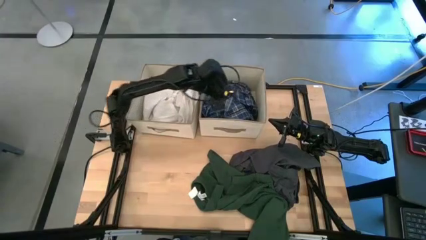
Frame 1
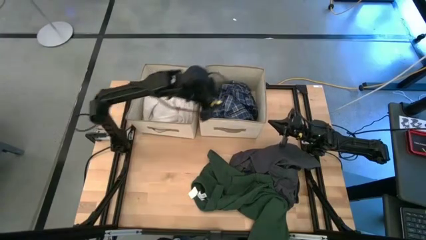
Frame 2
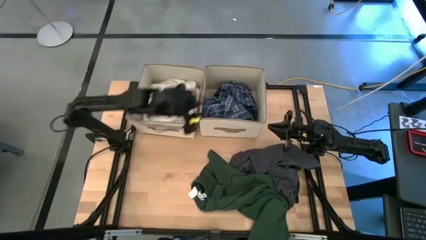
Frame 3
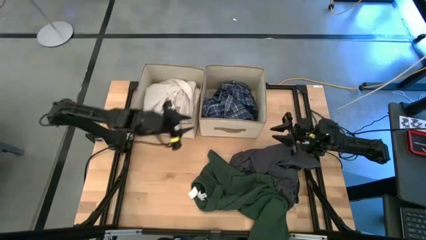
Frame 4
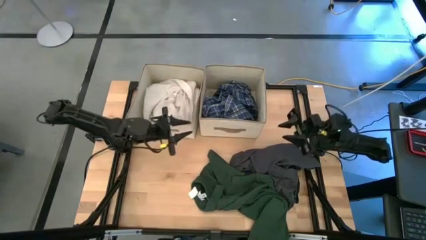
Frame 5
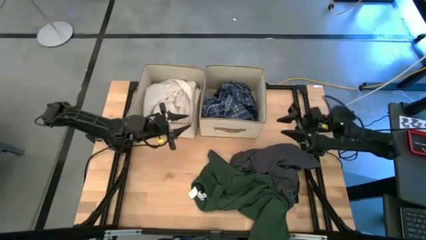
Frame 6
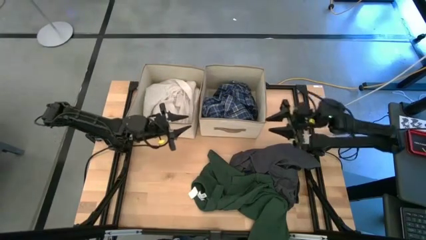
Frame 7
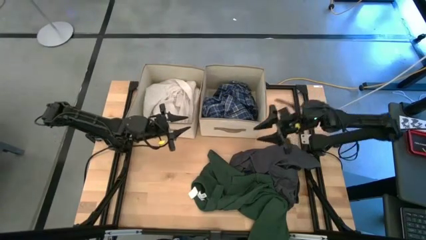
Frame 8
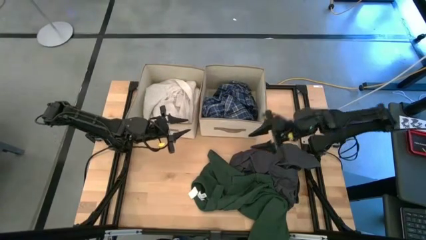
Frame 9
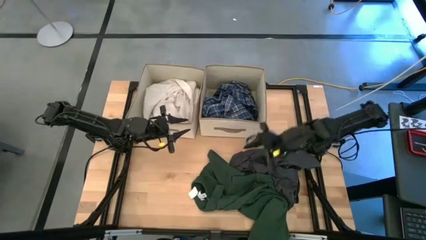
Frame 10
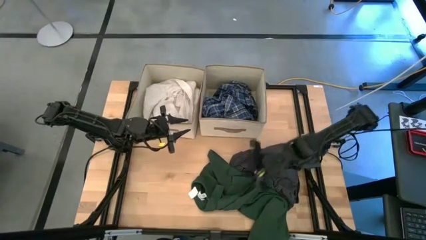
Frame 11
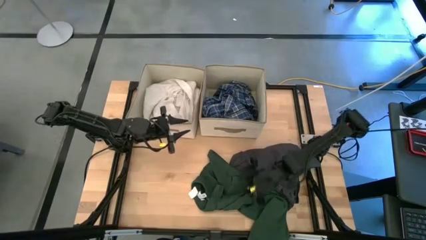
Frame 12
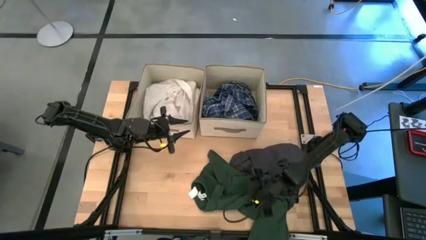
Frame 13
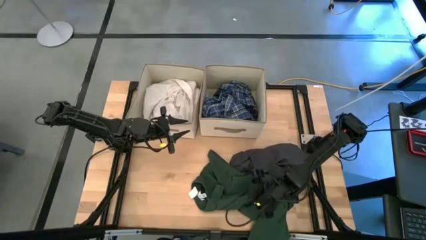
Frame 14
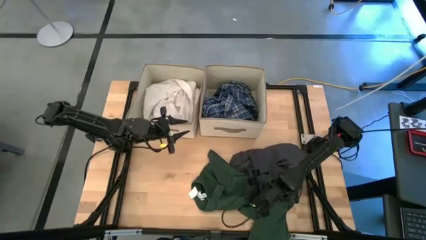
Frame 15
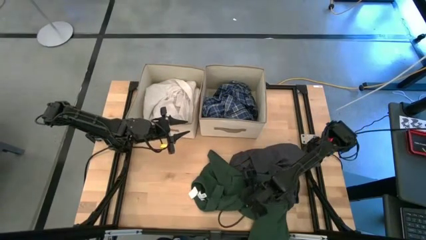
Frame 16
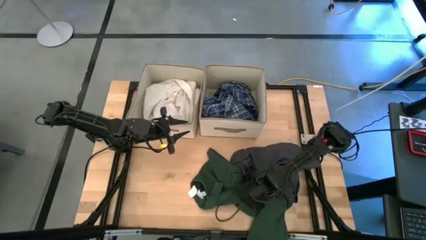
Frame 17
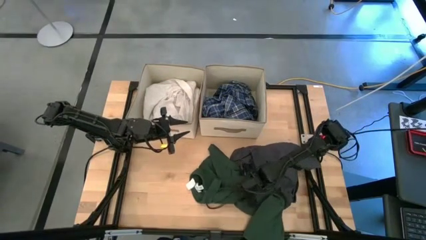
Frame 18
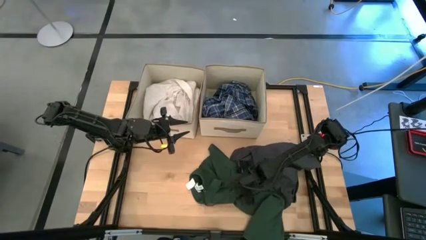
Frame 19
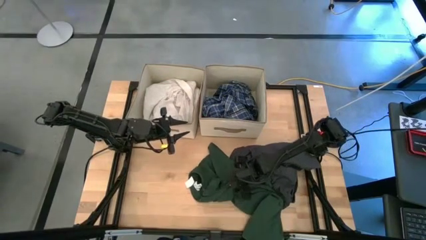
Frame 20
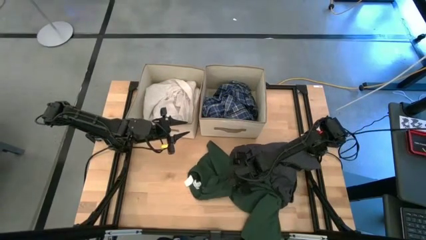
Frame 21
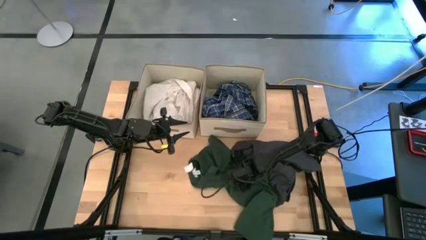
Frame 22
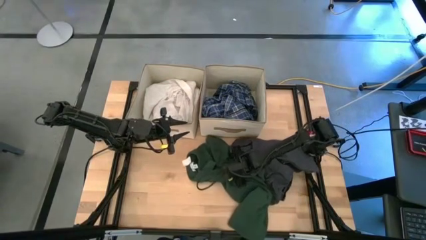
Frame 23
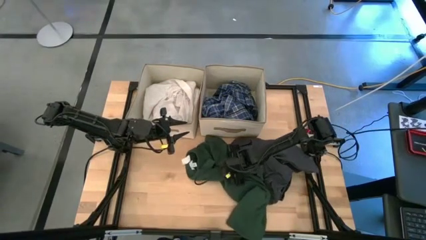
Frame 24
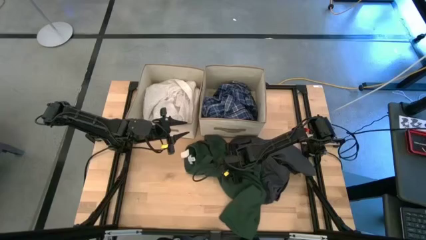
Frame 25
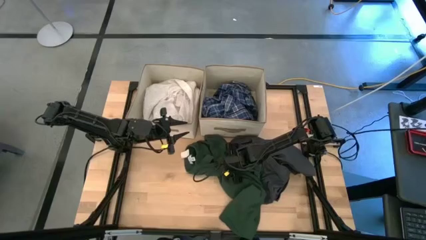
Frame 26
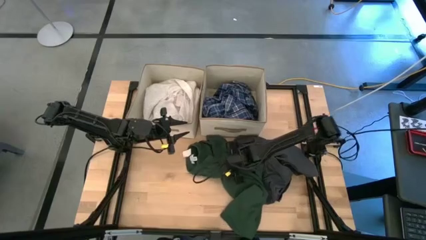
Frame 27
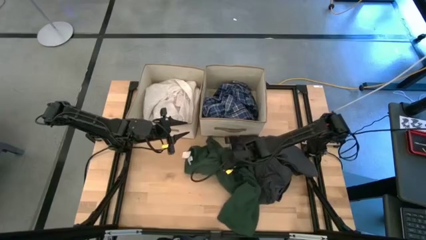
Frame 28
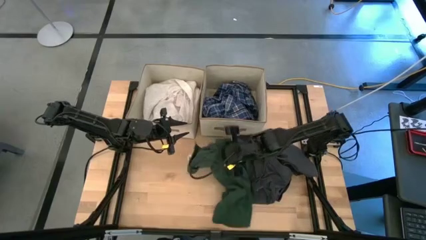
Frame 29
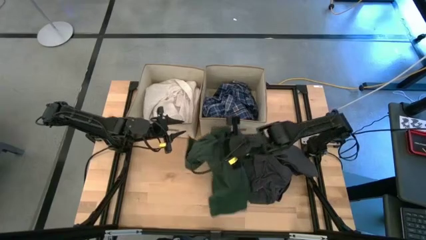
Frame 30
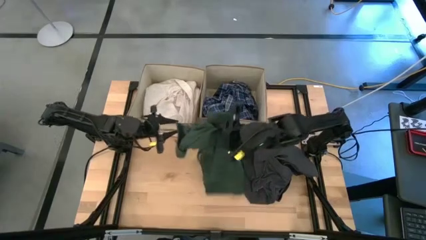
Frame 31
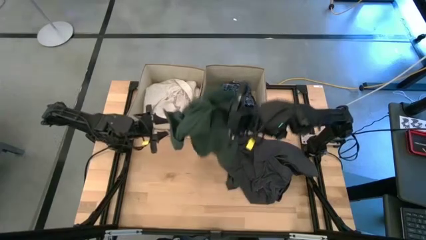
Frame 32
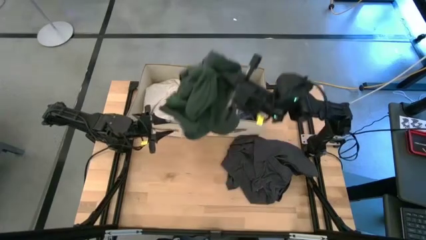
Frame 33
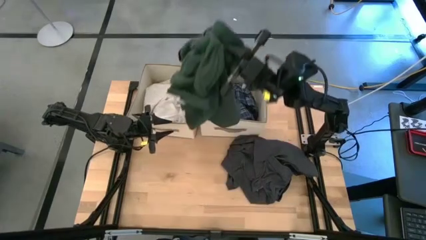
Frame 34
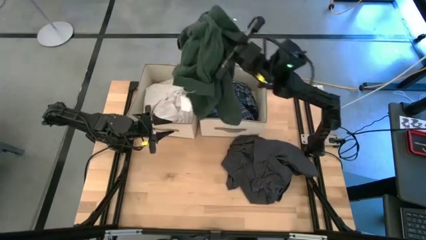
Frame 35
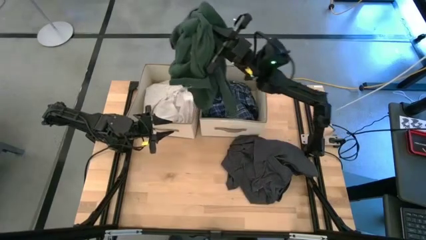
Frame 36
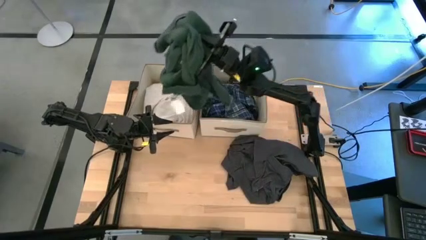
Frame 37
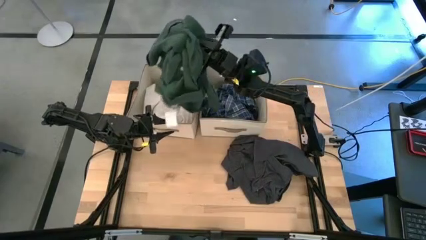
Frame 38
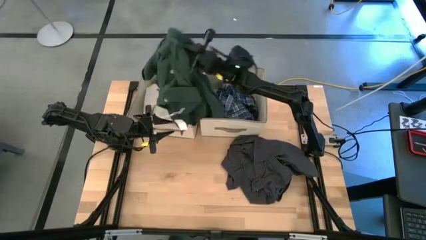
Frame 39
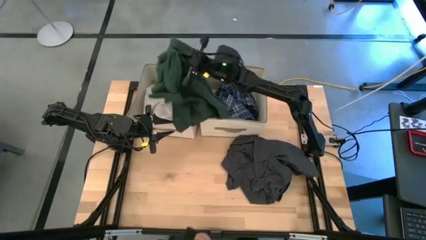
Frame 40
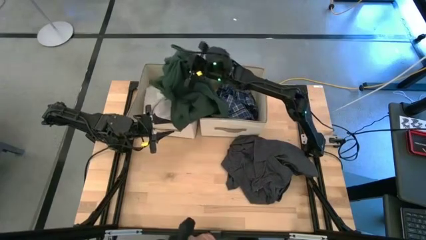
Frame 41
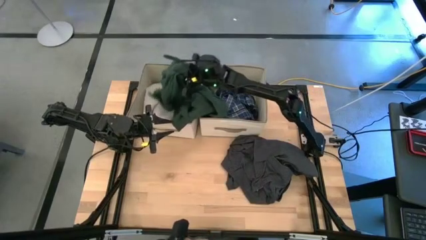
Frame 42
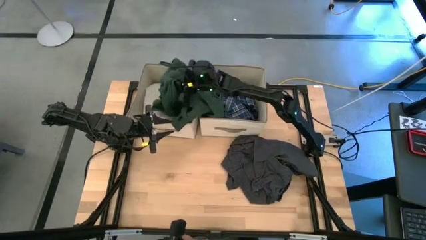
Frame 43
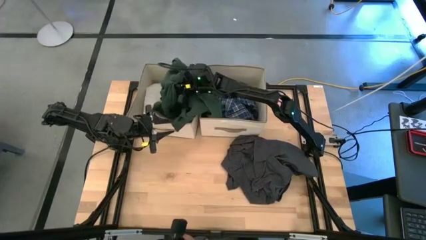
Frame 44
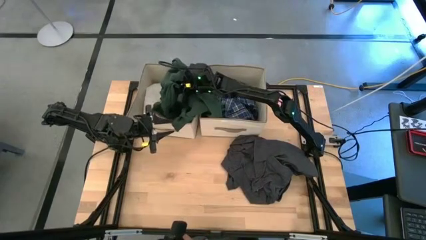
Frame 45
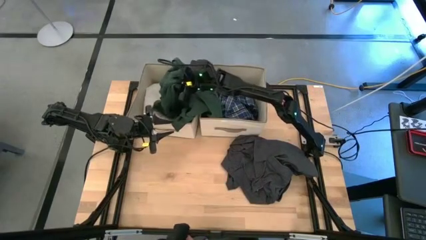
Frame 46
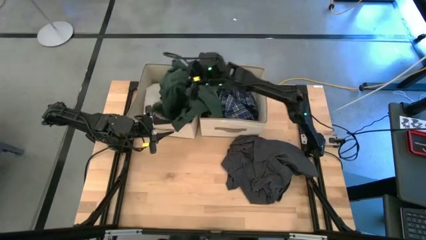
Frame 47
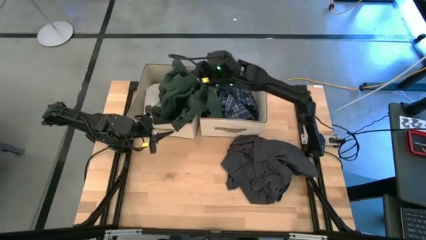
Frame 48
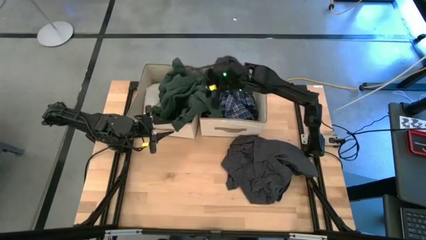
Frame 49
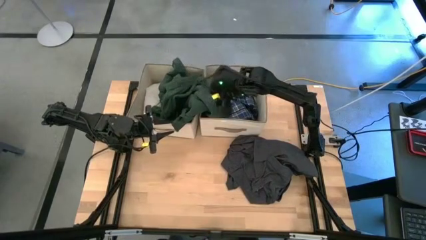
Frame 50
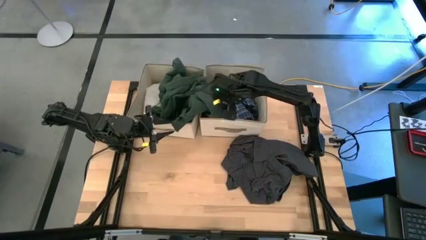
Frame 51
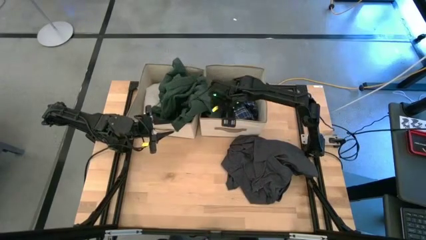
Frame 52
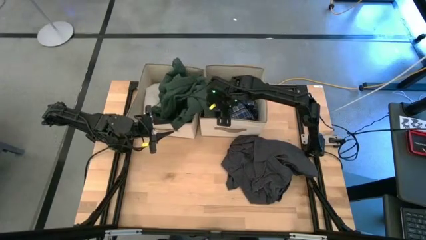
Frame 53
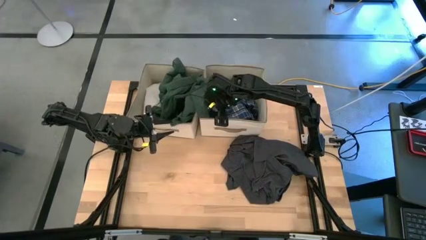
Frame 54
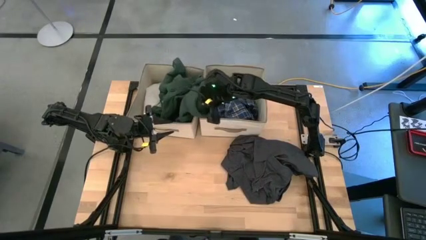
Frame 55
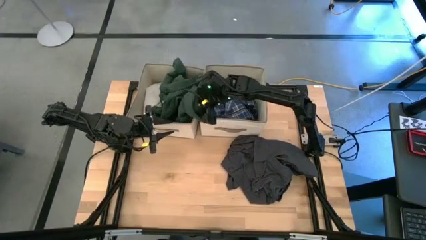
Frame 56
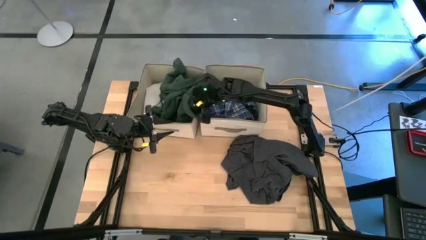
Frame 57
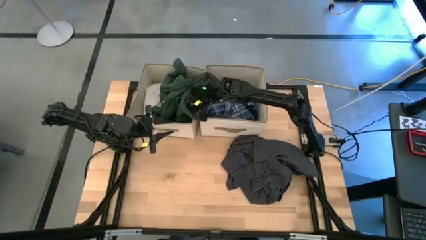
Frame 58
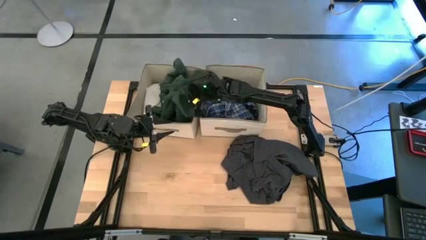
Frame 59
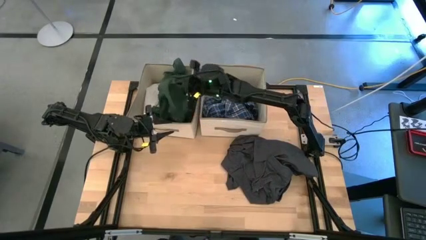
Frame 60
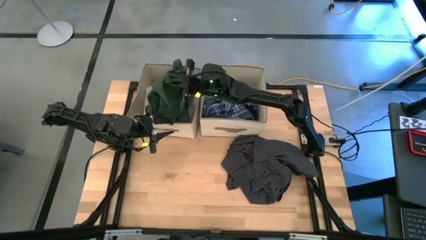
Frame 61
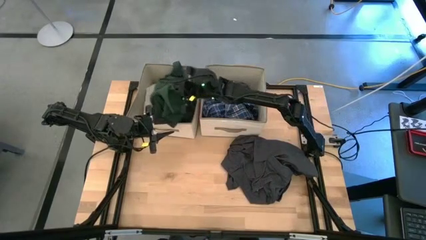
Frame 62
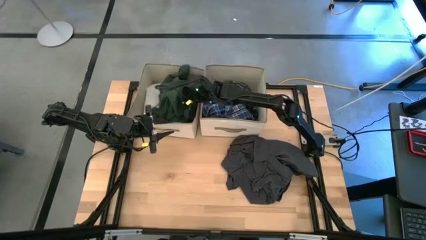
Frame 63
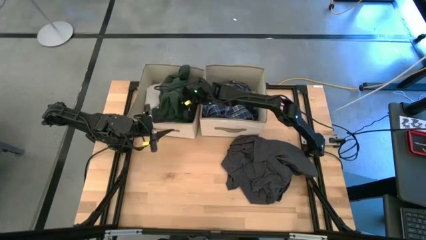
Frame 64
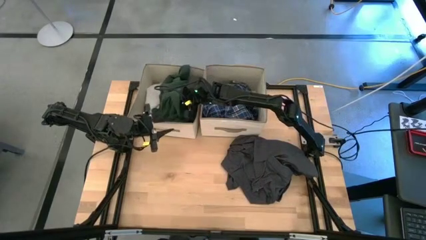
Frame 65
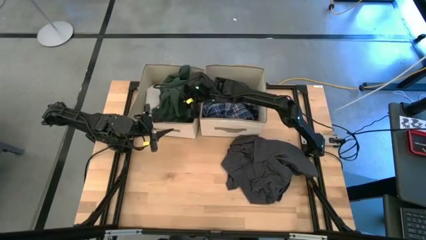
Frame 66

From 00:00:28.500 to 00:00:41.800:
Task: Sort clothes
Put the green polo shirt into the left laundry organizer
